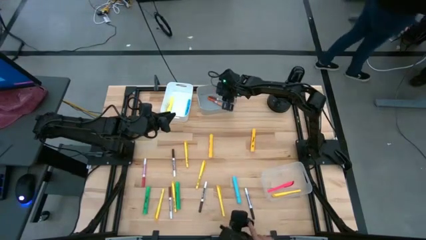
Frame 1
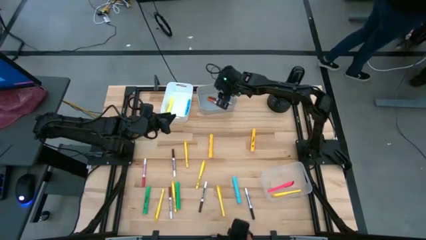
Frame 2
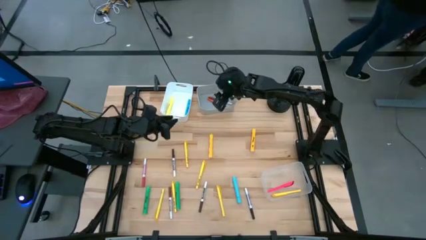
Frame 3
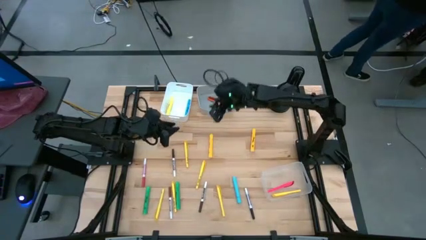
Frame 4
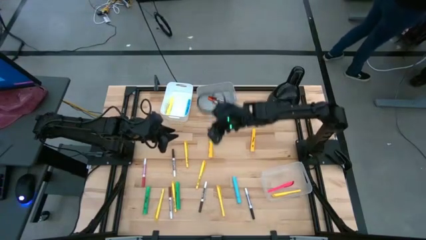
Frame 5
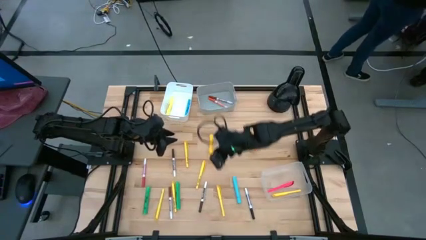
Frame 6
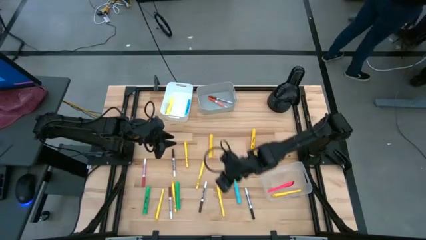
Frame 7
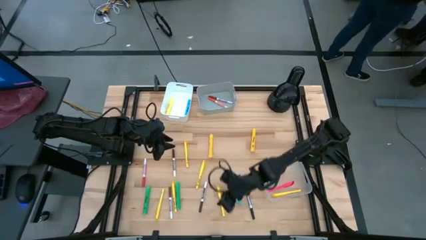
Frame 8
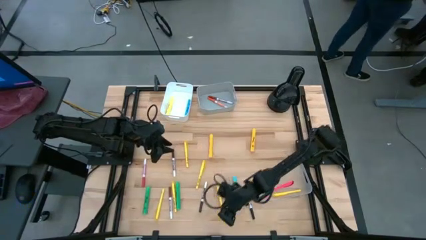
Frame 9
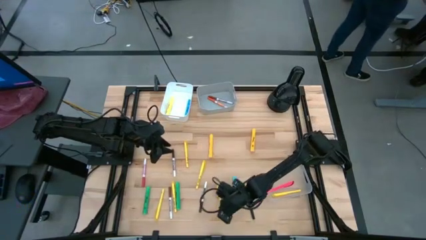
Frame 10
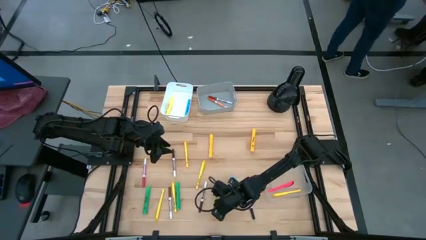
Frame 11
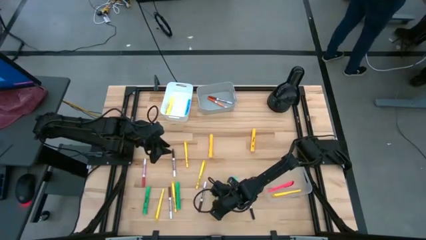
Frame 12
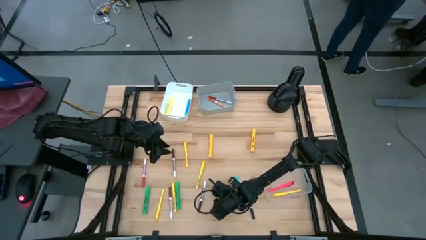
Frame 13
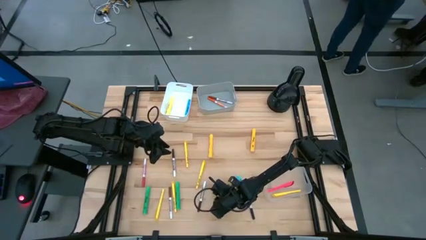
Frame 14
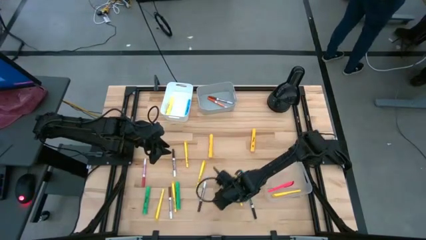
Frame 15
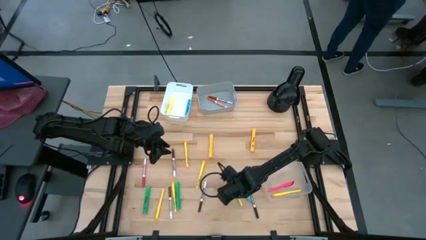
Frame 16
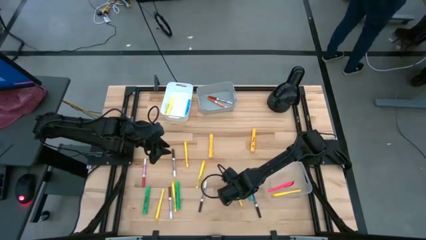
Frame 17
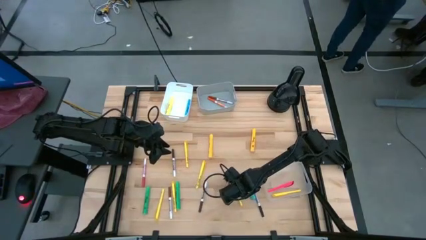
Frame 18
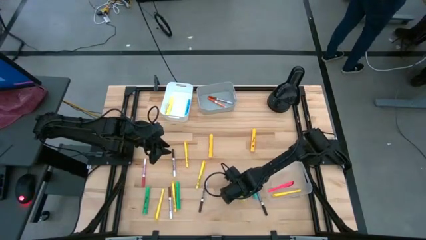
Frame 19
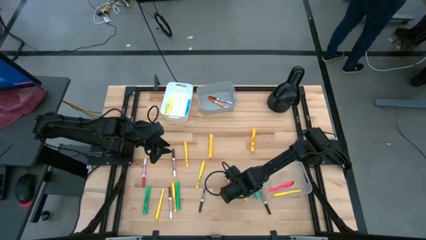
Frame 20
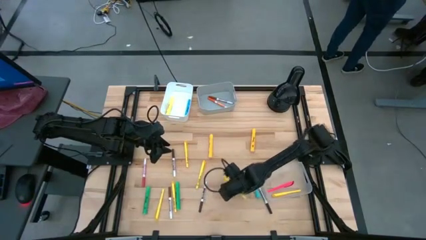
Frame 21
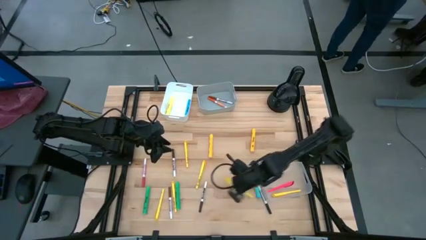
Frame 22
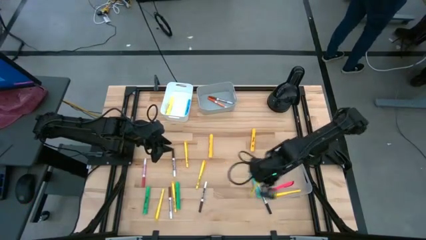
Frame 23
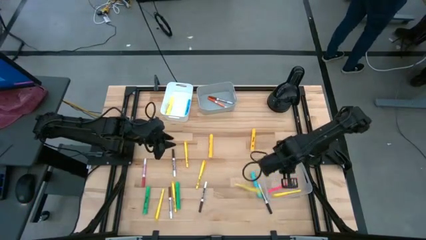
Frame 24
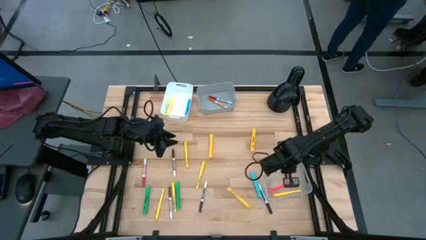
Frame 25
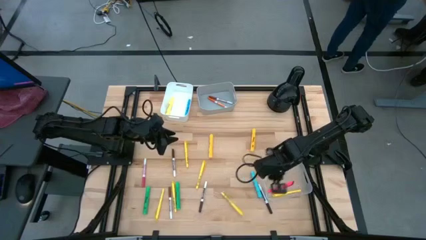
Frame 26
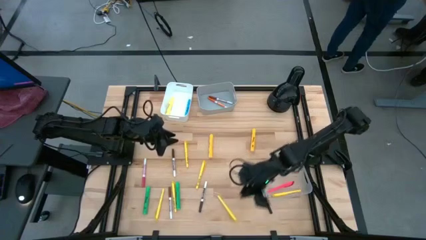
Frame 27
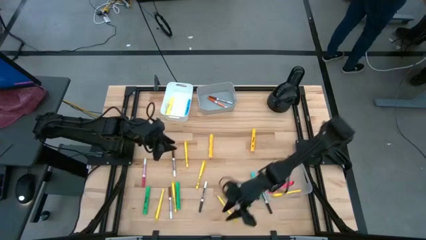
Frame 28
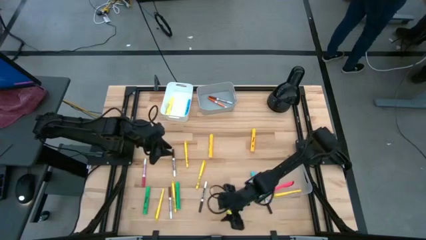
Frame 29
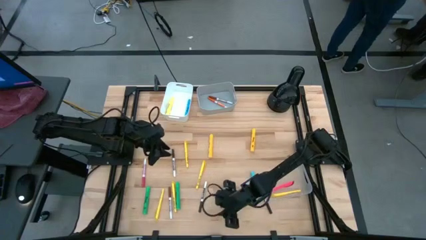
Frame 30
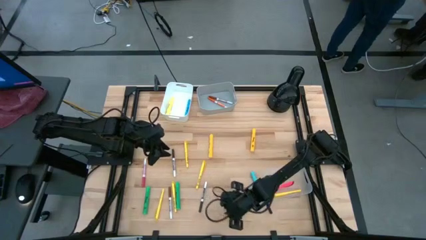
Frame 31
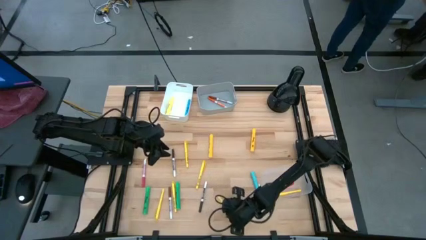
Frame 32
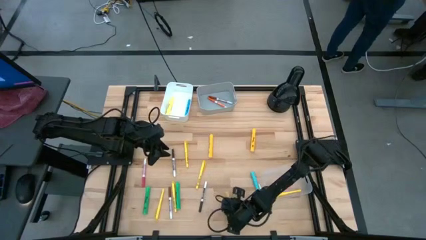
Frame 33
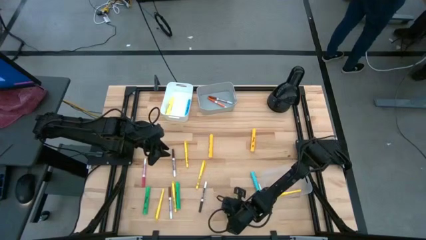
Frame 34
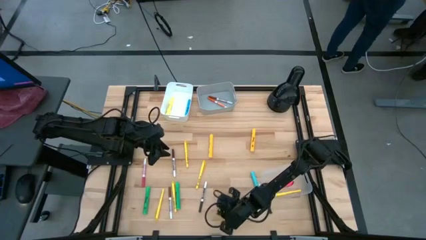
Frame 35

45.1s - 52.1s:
Task: Pick & Place Markers
Put the yellow pen into the transparent bin

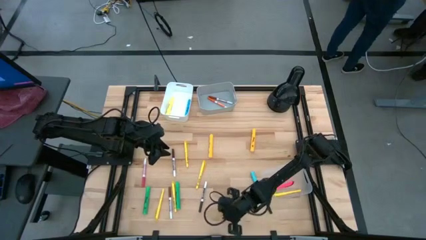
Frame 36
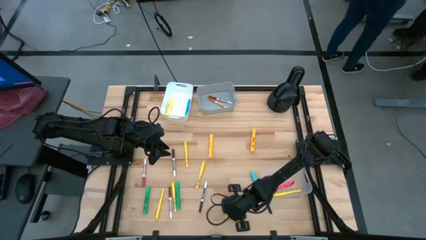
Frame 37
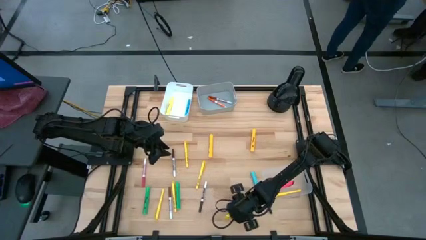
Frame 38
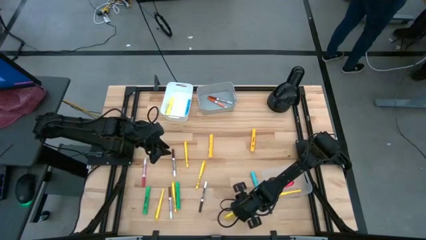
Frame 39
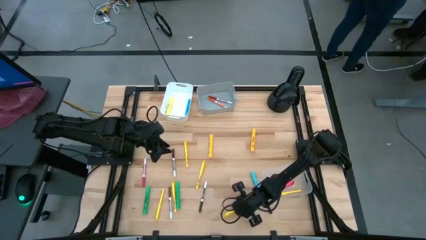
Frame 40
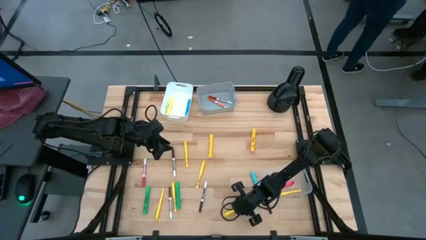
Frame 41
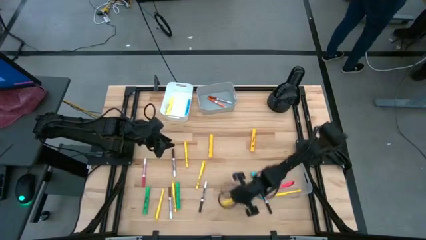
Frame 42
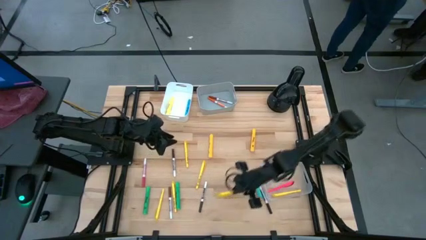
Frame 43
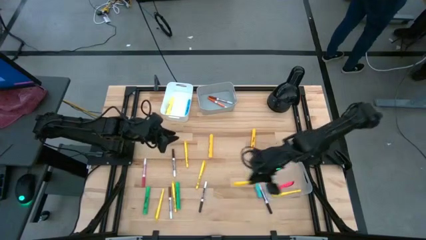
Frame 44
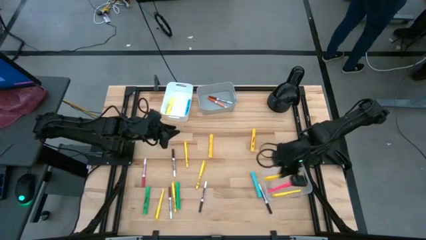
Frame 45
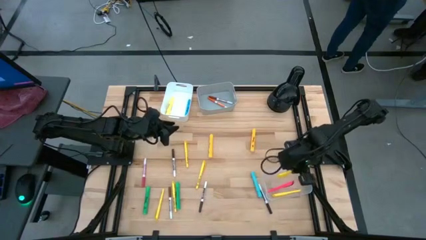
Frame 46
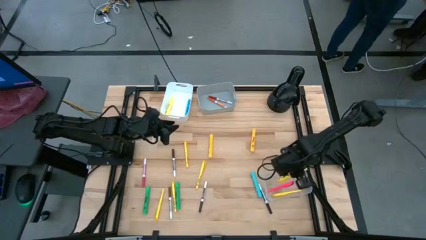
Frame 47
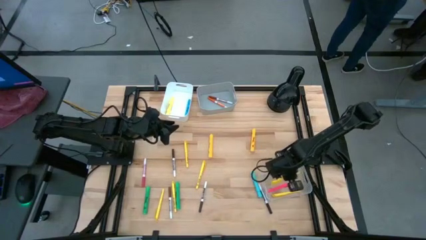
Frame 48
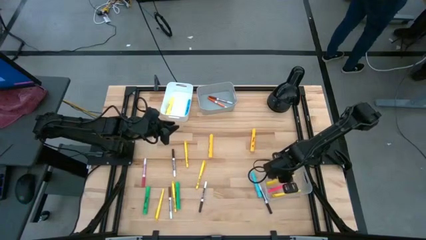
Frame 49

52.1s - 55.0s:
Put the yellow pen into the transparent bin

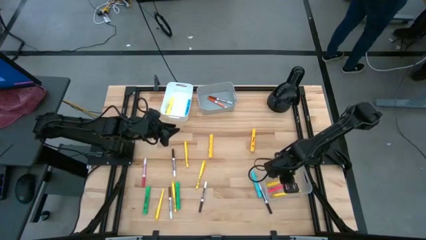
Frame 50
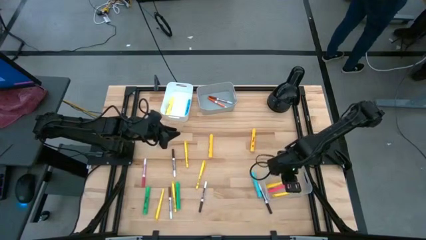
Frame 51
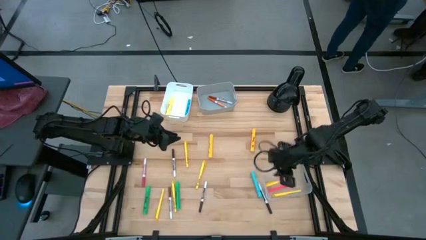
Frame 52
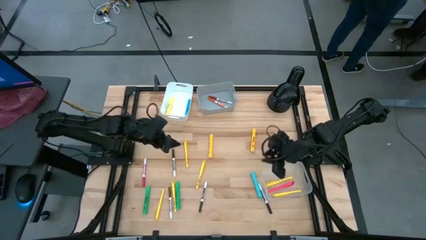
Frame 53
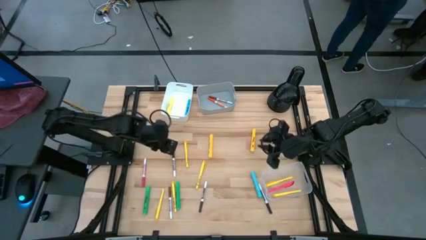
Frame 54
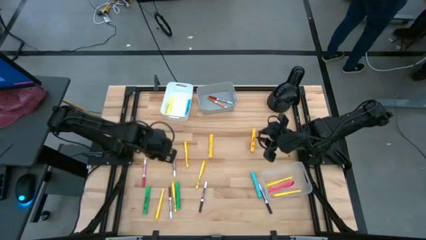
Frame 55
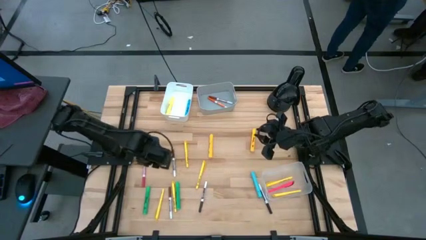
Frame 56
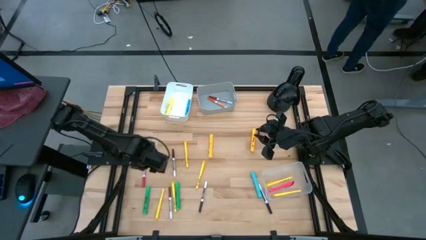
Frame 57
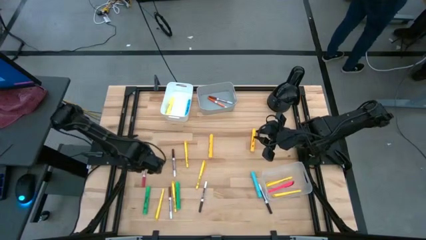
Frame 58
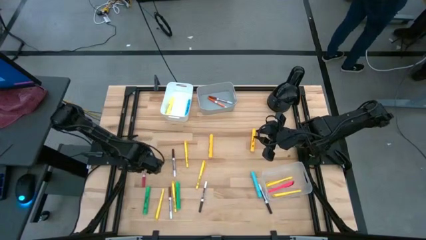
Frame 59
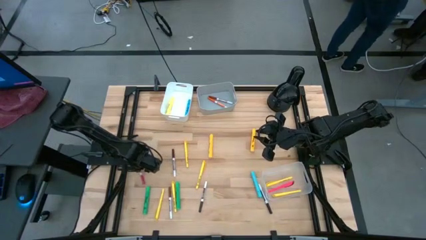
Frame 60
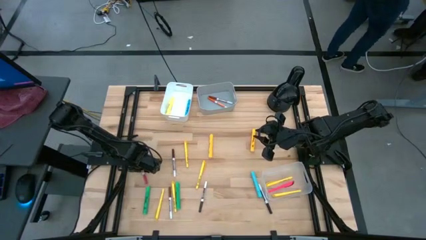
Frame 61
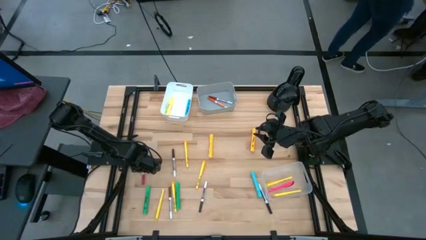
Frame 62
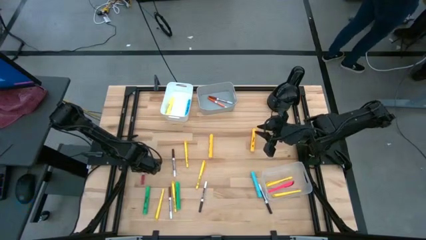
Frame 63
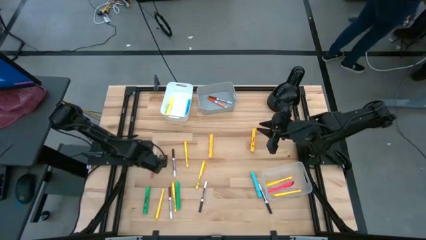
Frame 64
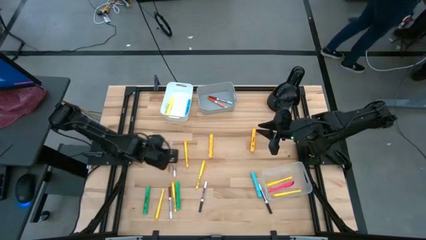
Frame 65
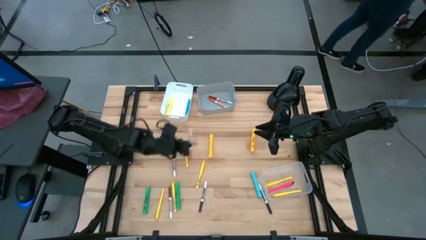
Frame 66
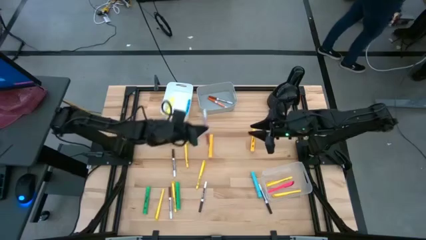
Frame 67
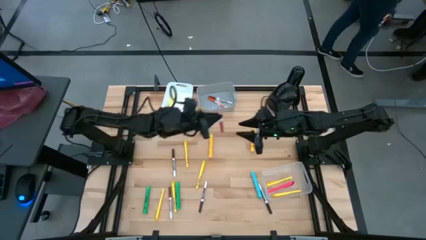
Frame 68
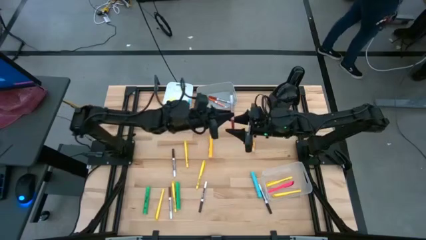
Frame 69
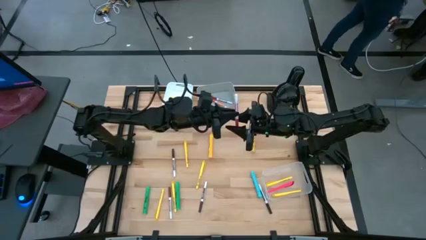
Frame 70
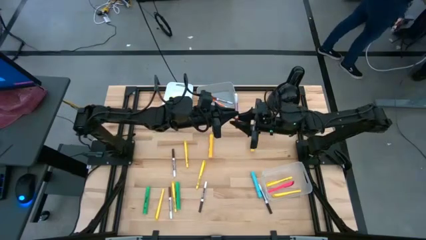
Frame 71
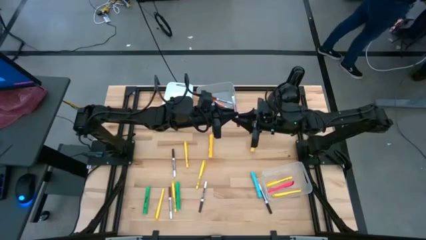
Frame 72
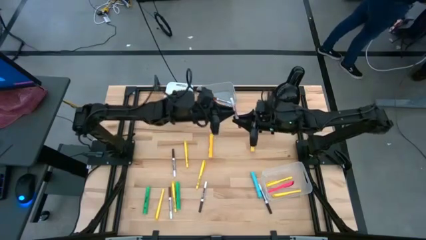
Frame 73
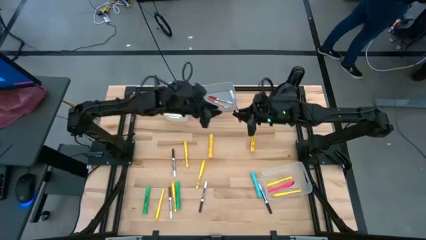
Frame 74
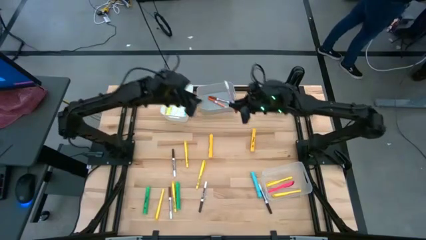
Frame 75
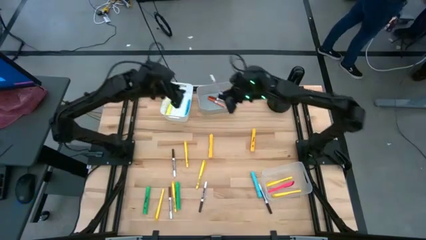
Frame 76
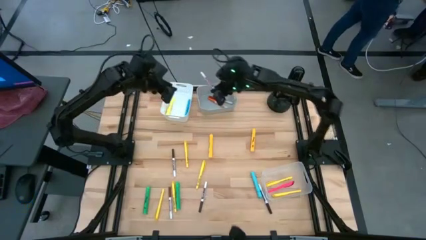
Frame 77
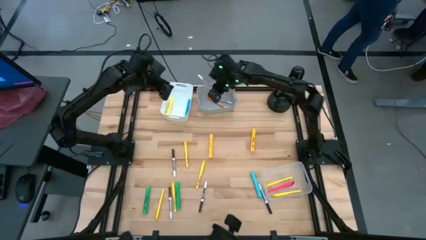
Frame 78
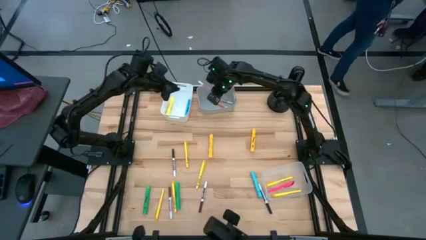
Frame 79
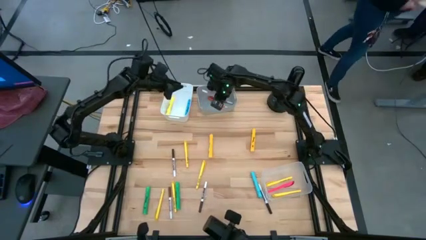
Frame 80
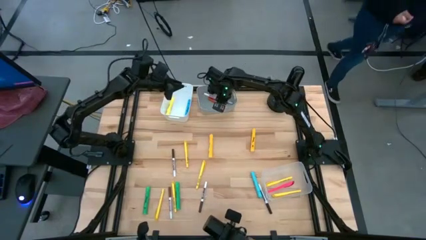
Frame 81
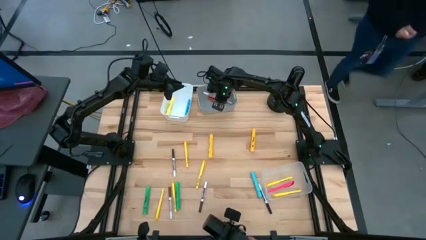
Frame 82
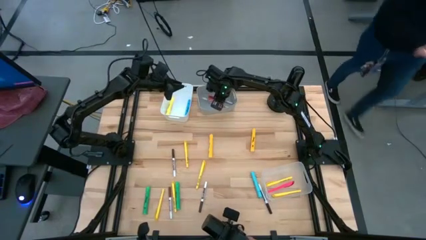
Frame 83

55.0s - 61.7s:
Put the pink marker pen into the gray bin
